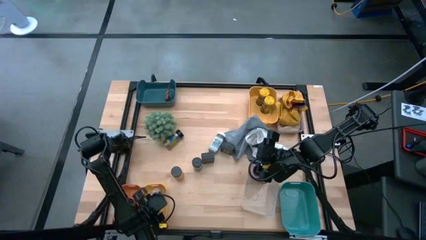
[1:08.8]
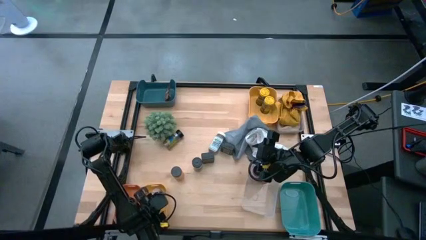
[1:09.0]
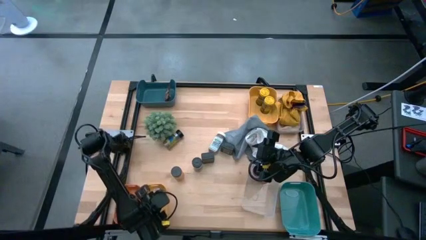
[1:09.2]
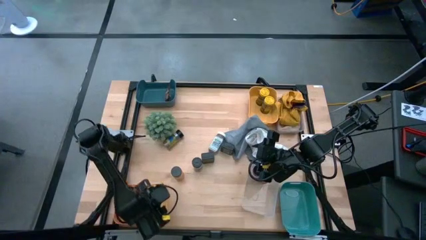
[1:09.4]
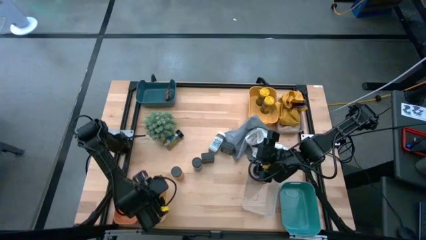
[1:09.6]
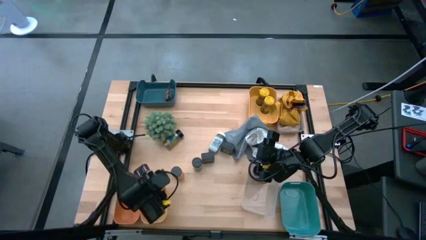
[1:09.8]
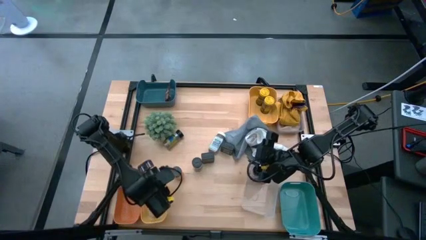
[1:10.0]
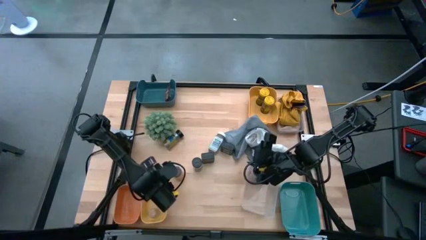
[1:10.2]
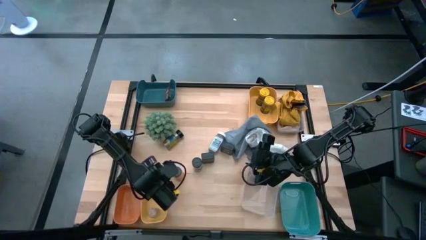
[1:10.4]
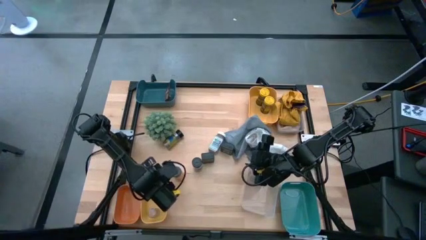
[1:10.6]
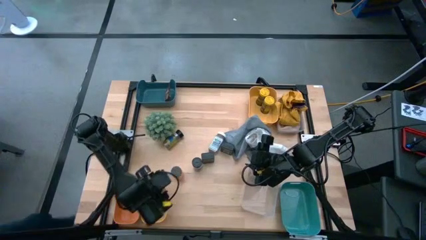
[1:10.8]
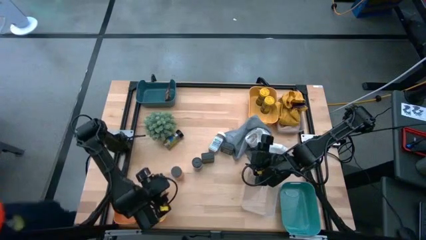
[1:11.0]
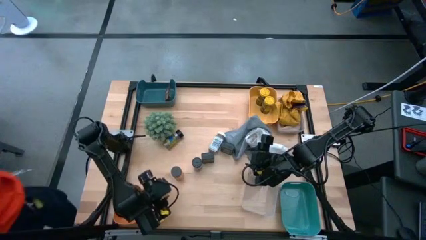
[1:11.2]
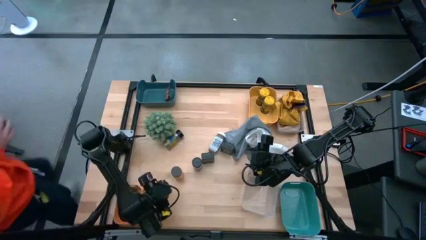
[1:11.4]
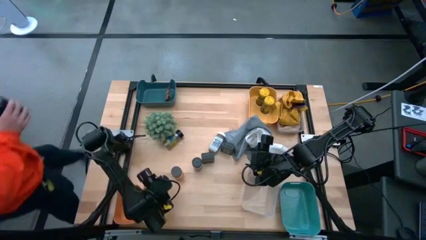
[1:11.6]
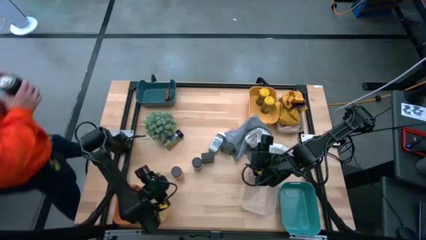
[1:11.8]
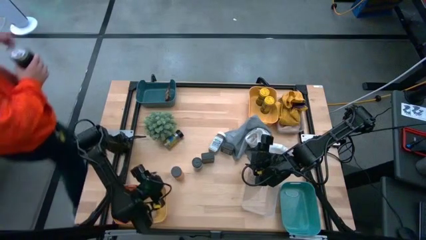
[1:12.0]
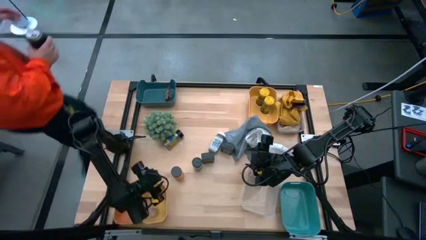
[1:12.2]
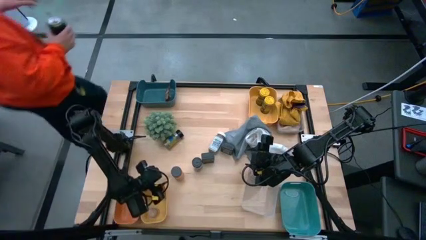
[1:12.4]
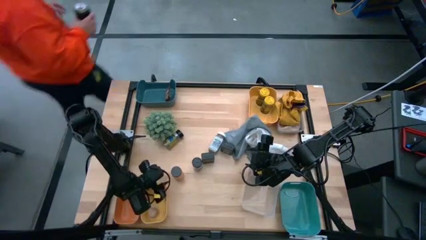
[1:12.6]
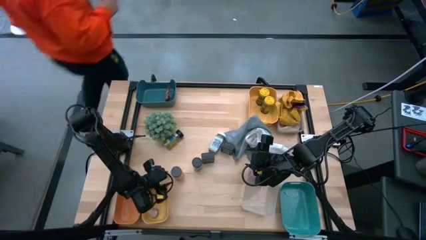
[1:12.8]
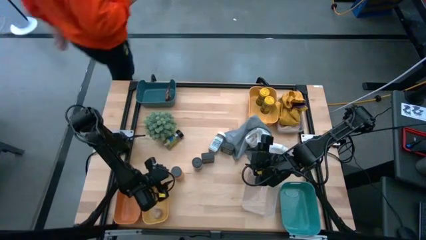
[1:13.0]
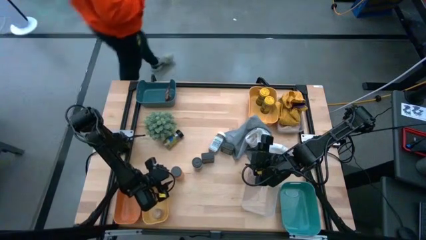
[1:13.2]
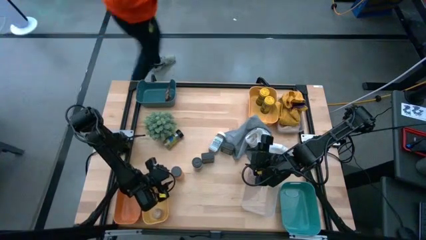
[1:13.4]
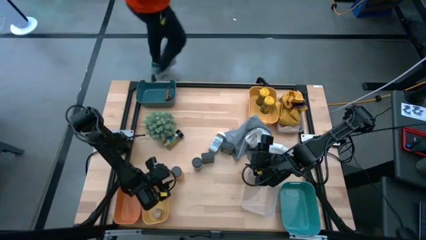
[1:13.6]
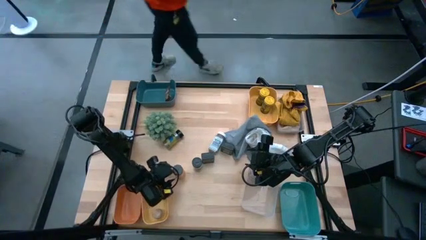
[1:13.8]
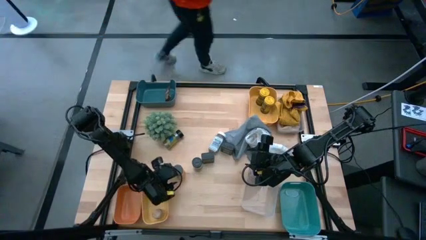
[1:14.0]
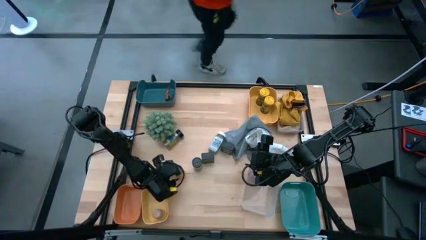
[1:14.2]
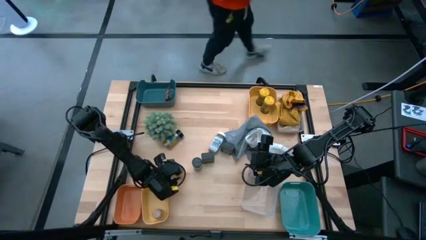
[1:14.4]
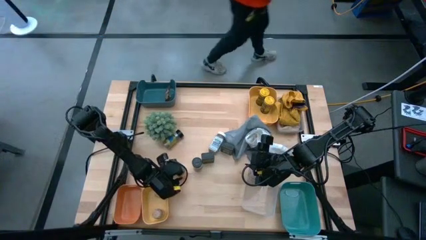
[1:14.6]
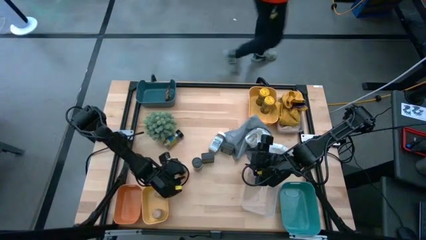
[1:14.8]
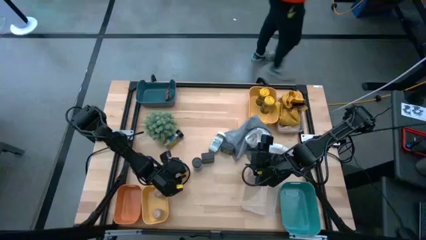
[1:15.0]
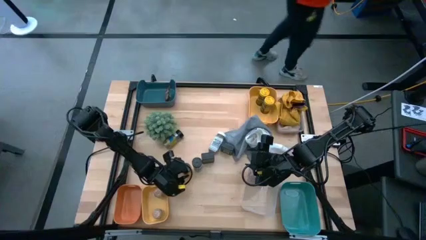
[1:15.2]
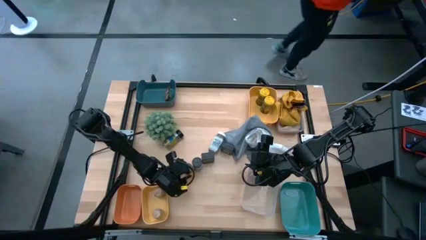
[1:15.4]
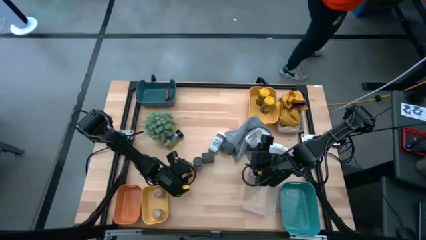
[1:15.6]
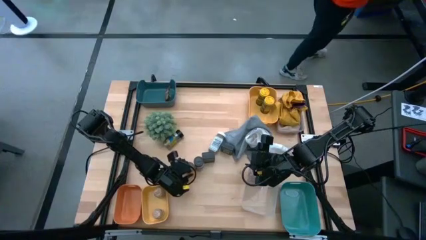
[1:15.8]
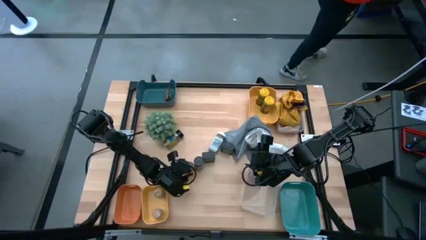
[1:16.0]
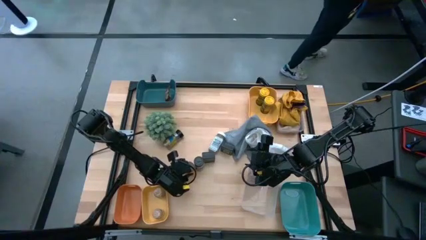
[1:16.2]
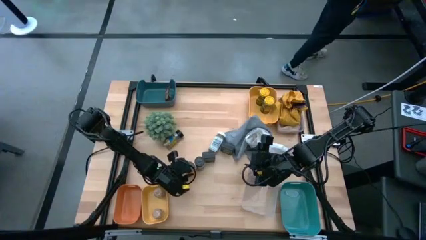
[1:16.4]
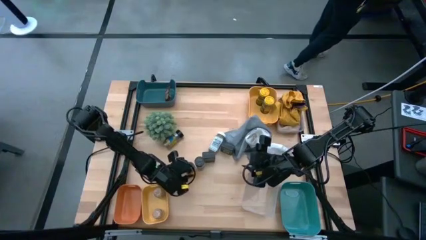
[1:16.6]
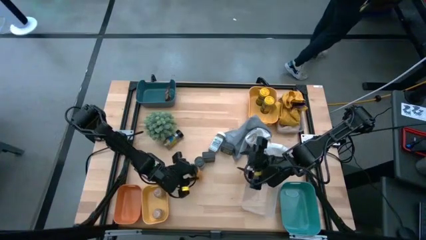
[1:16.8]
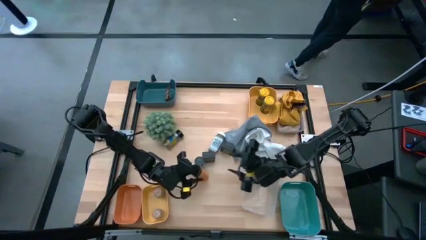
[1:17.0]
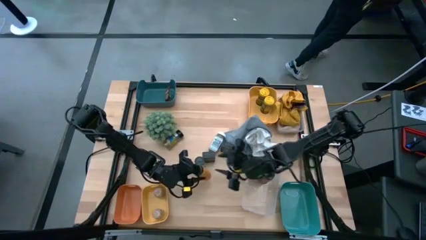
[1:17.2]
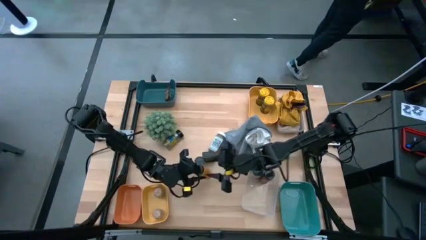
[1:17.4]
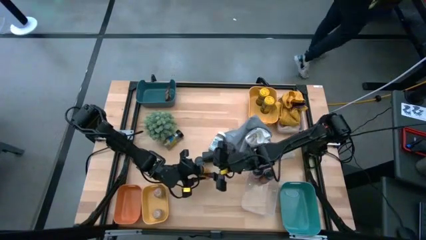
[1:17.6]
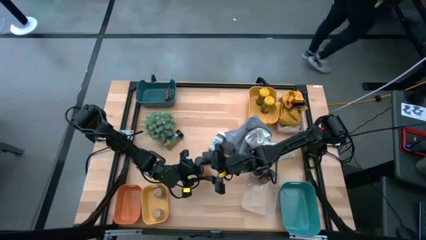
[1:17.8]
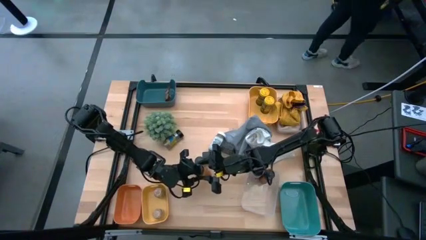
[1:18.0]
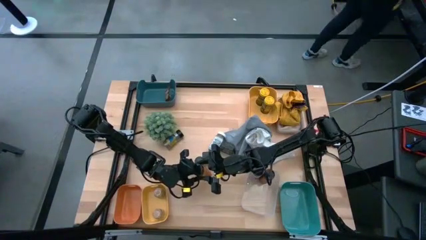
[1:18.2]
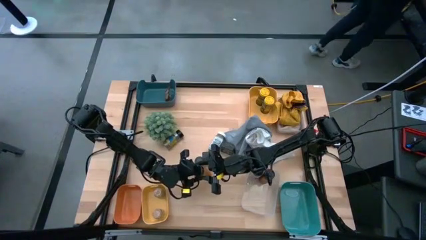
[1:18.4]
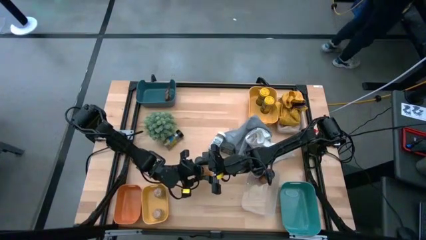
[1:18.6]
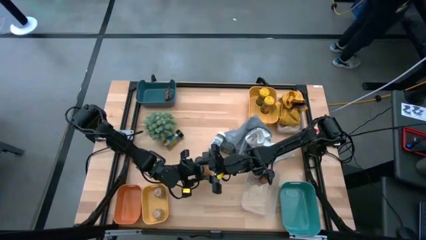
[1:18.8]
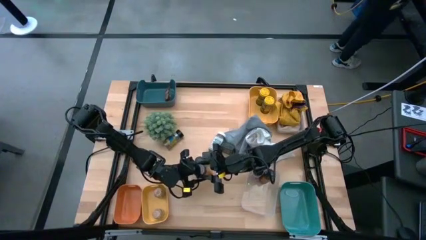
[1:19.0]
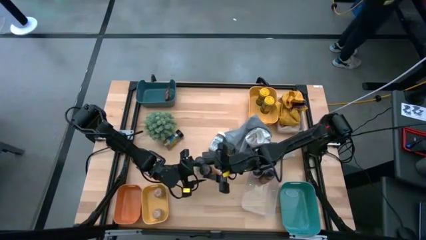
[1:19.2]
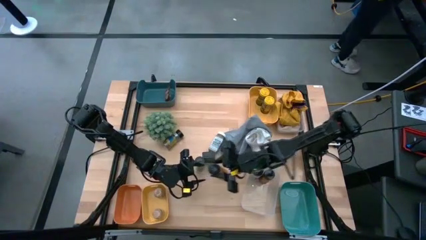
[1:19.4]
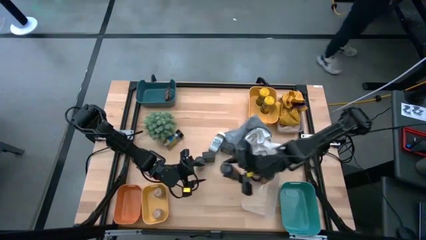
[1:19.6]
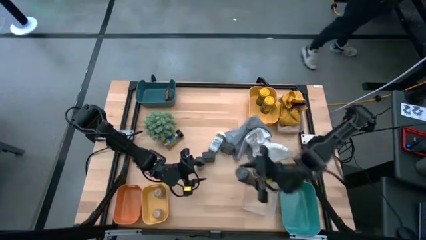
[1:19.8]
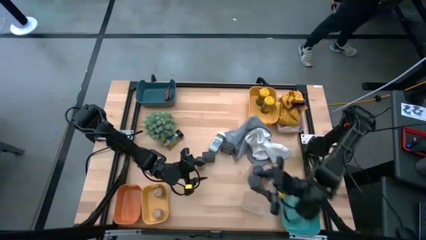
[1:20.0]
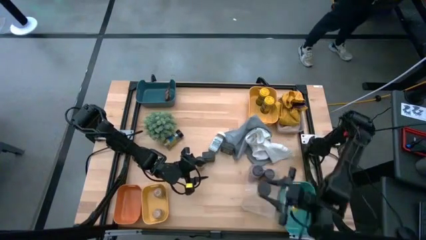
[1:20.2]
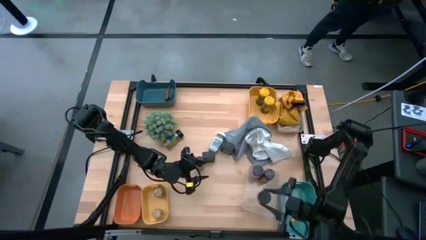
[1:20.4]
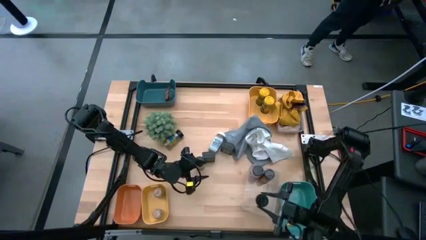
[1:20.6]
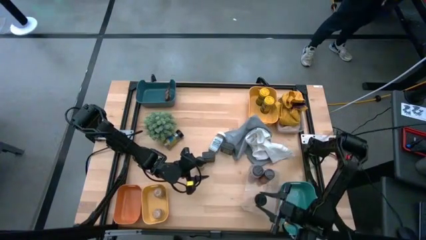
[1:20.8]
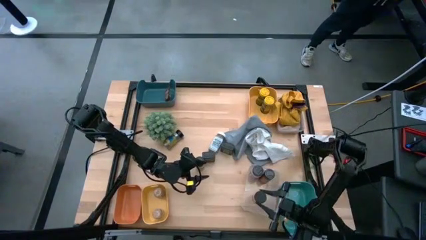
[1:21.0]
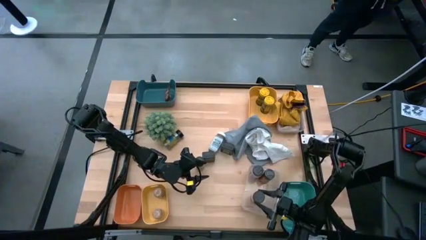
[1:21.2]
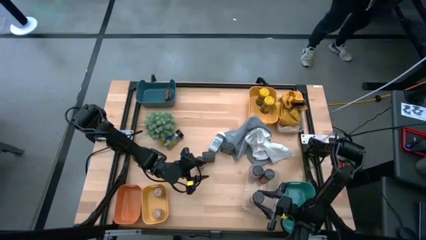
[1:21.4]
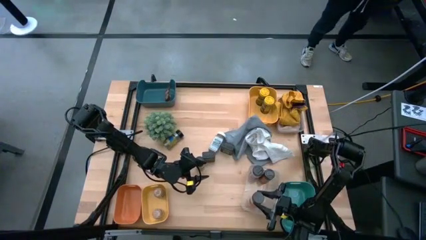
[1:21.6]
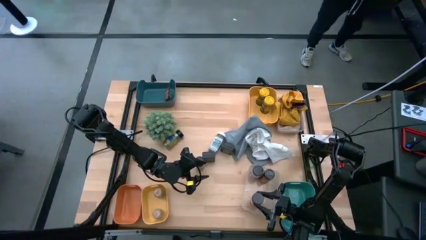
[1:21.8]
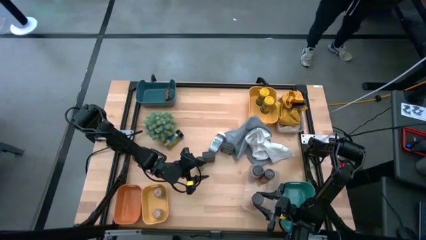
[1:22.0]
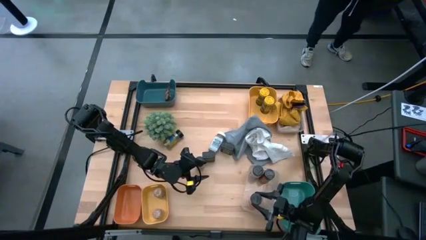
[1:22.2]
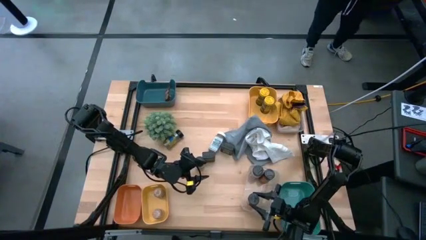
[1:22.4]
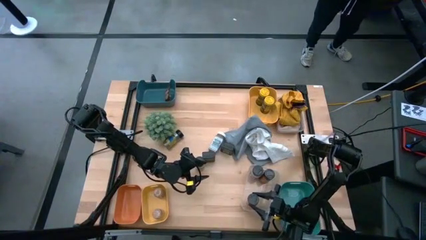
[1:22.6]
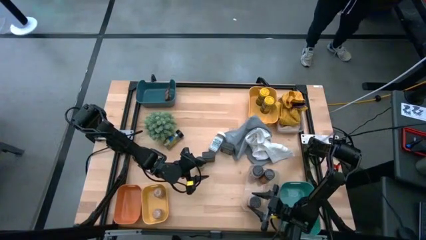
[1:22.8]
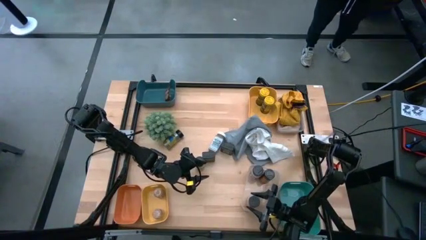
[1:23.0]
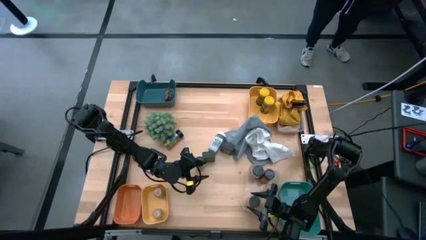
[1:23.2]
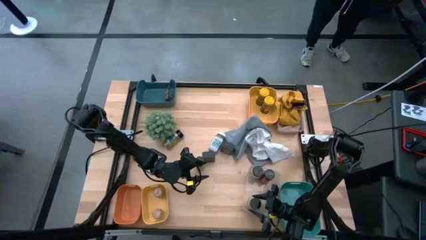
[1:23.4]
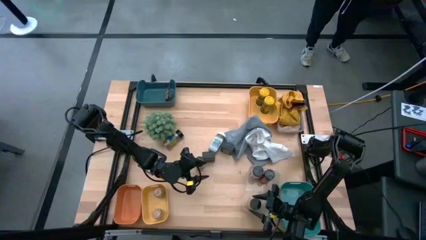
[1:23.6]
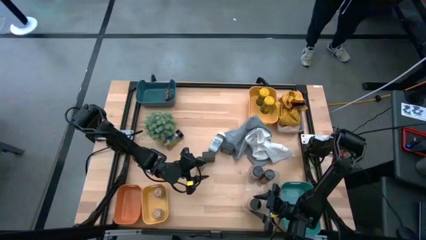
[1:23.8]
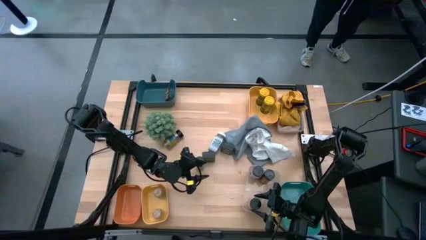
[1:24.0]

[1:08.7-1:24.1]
Task: Sort spices by type
Put the black seasoning bottle into the transparent bin
